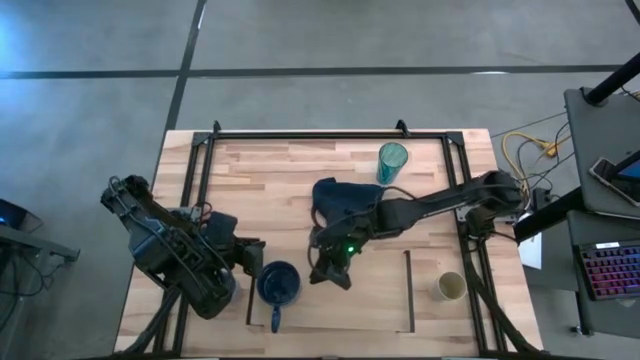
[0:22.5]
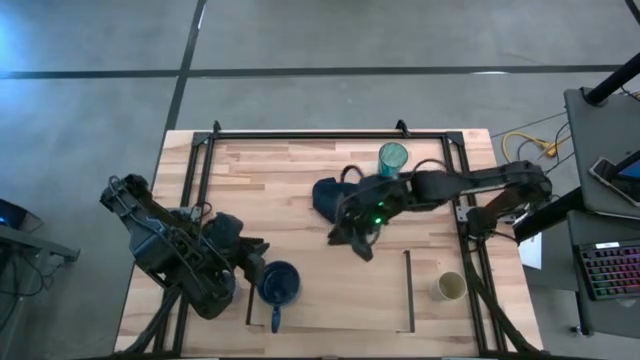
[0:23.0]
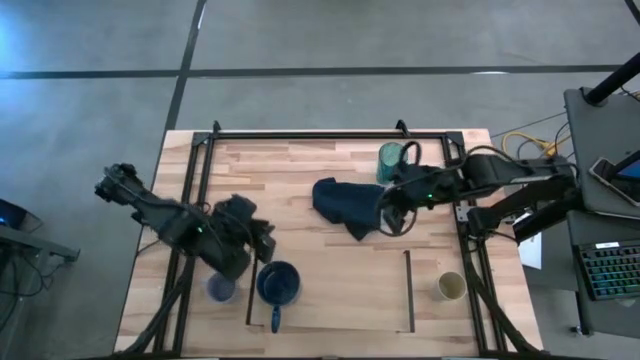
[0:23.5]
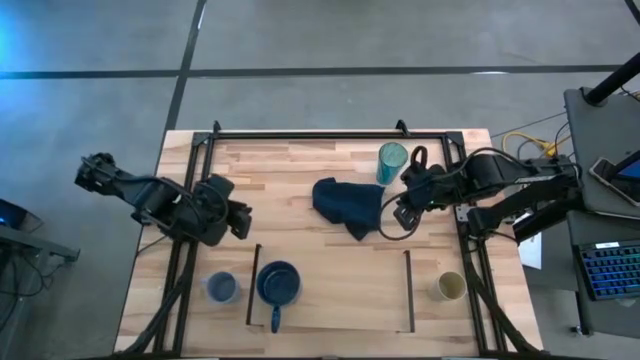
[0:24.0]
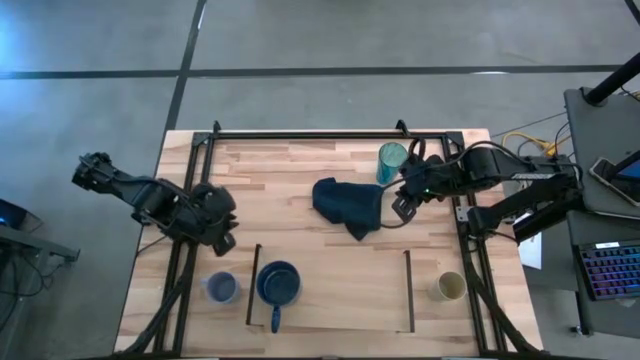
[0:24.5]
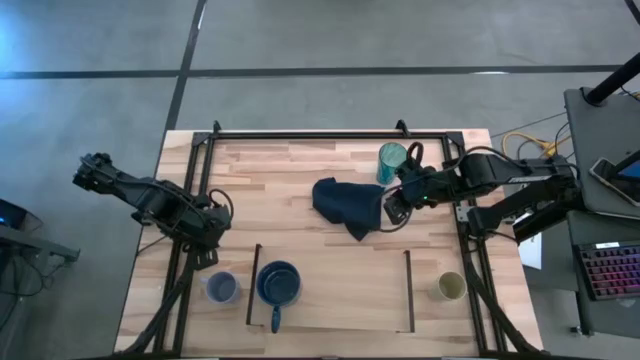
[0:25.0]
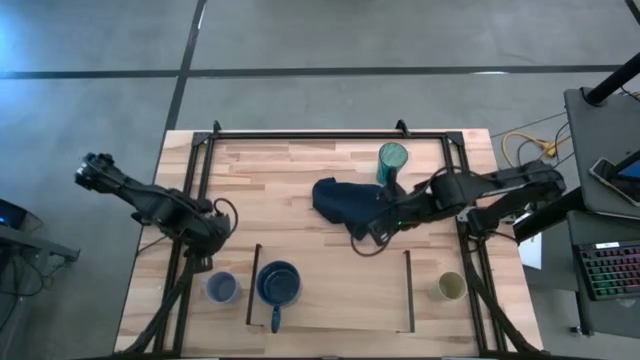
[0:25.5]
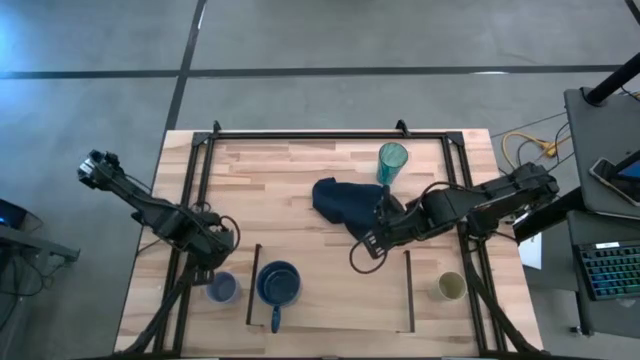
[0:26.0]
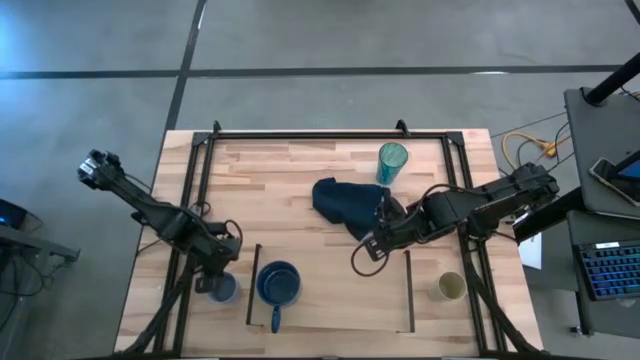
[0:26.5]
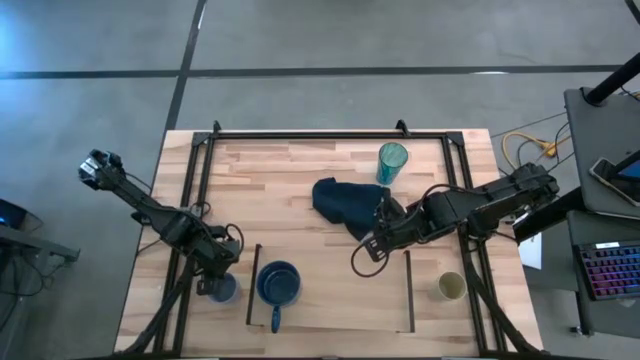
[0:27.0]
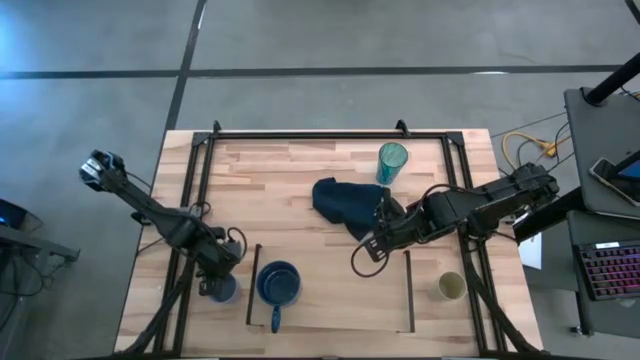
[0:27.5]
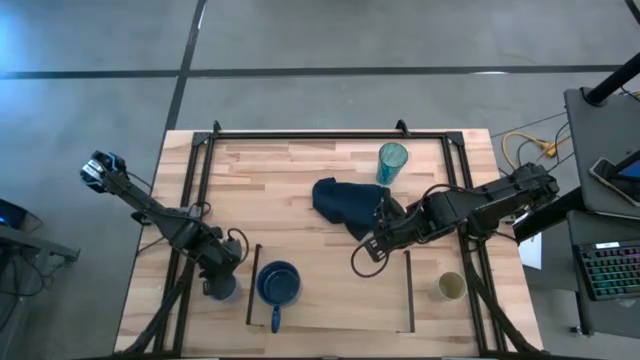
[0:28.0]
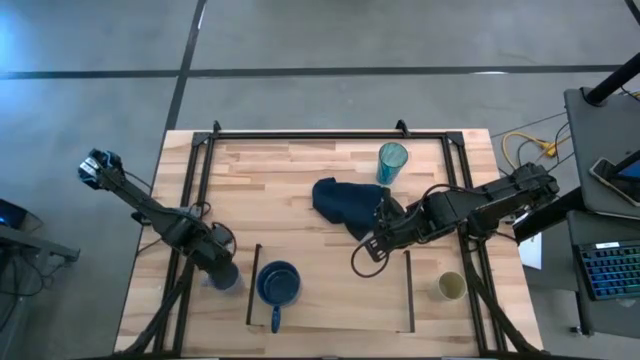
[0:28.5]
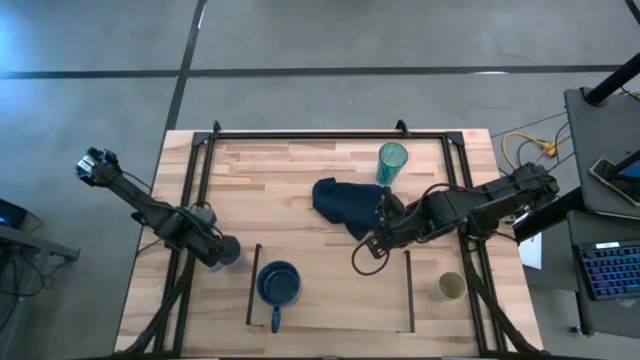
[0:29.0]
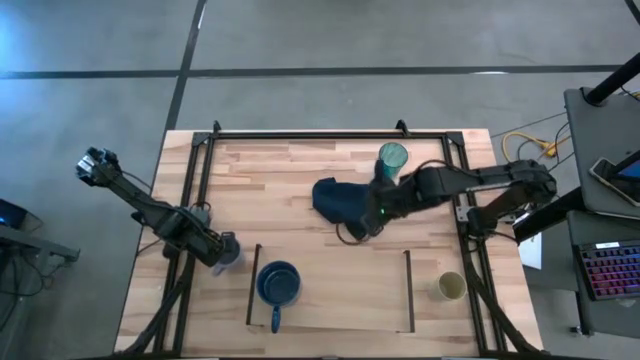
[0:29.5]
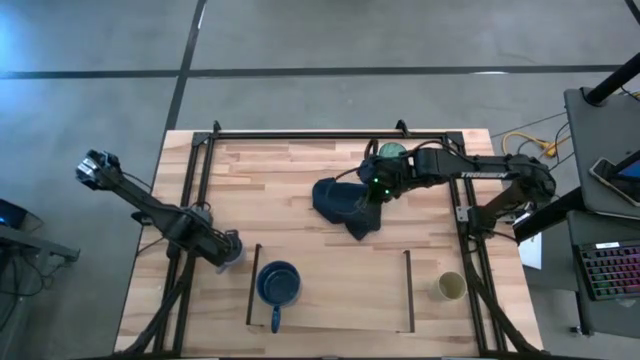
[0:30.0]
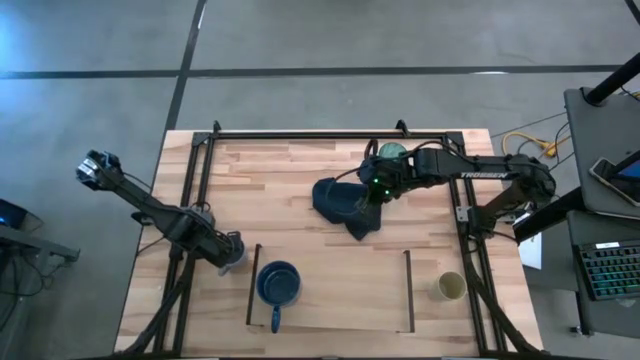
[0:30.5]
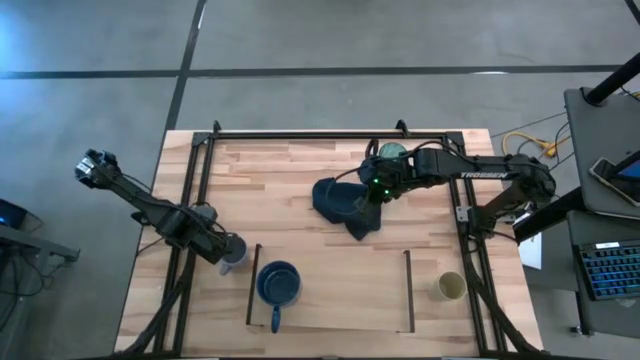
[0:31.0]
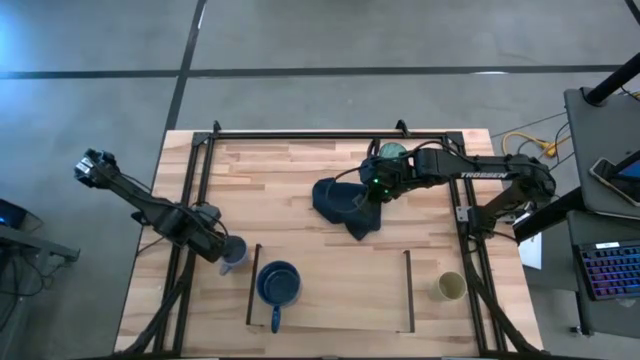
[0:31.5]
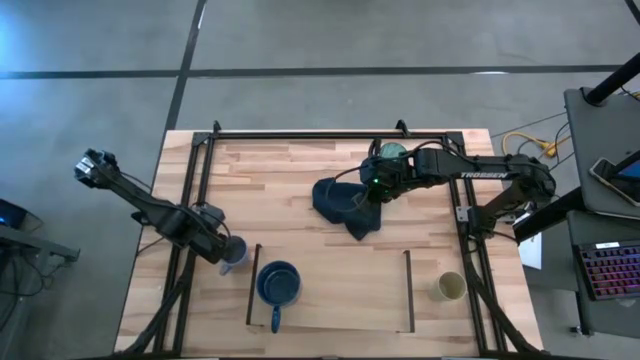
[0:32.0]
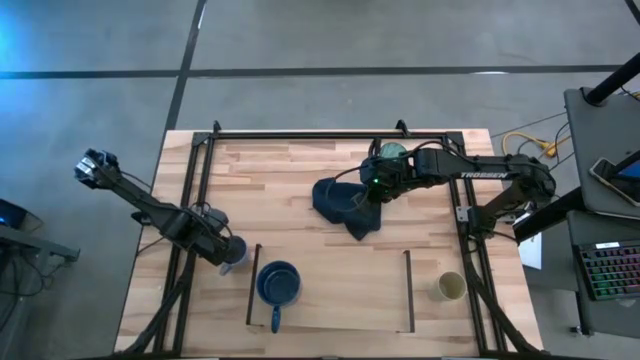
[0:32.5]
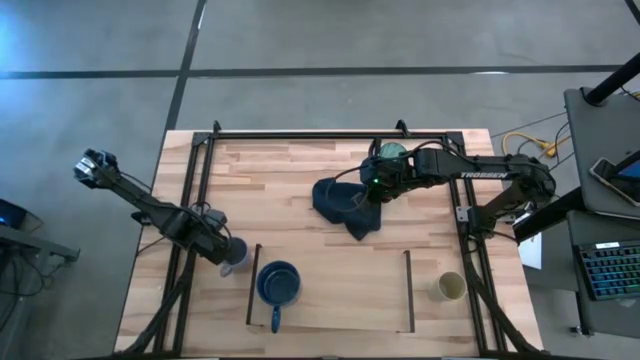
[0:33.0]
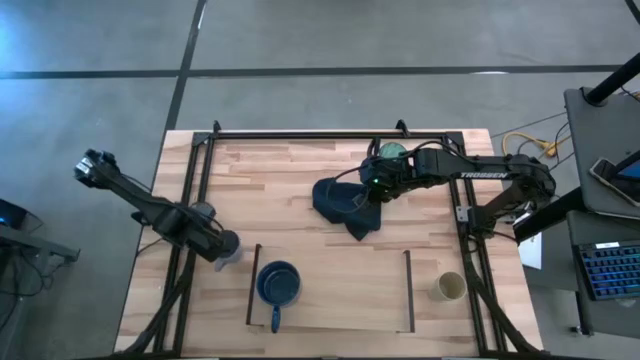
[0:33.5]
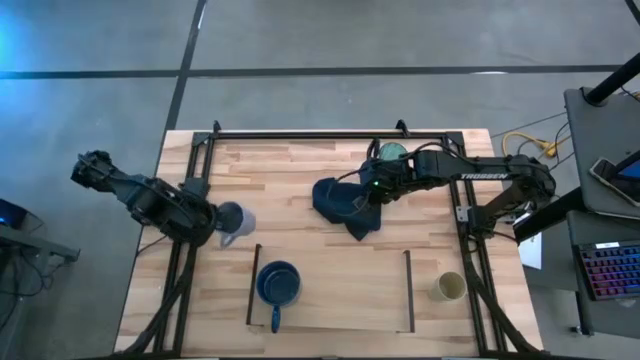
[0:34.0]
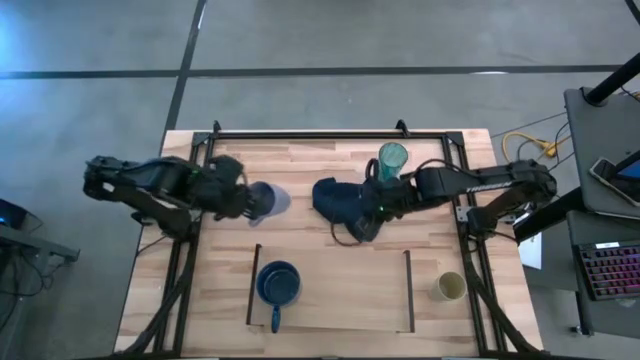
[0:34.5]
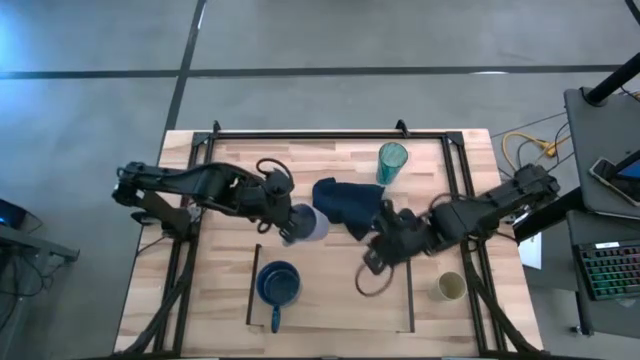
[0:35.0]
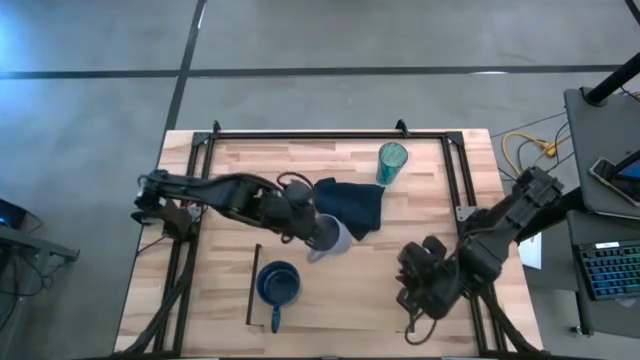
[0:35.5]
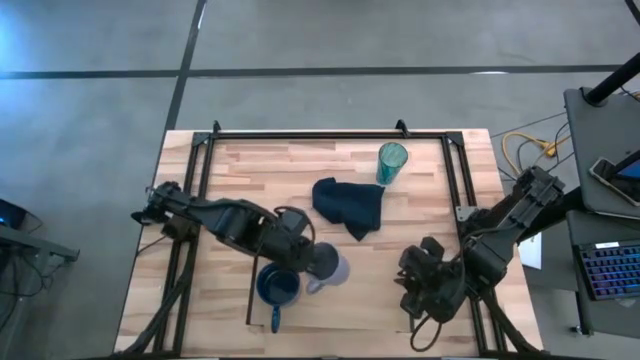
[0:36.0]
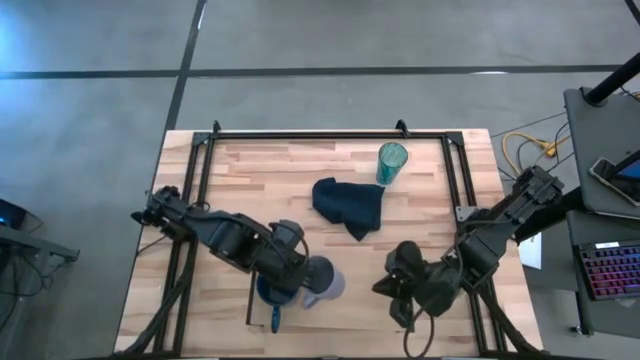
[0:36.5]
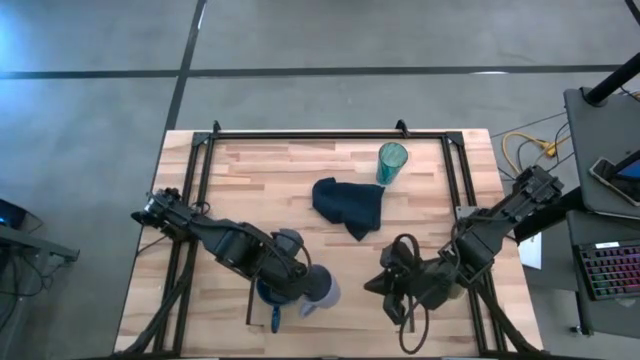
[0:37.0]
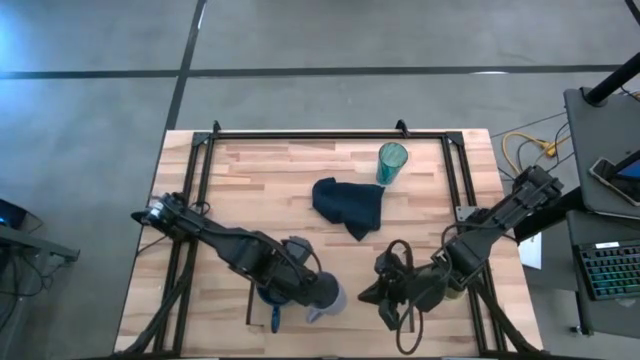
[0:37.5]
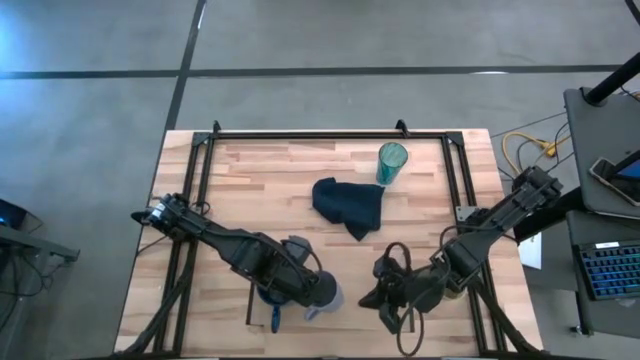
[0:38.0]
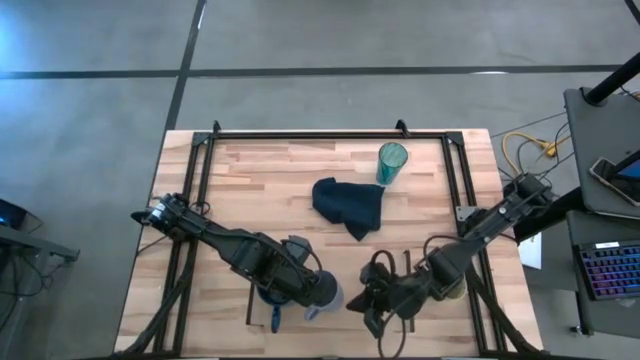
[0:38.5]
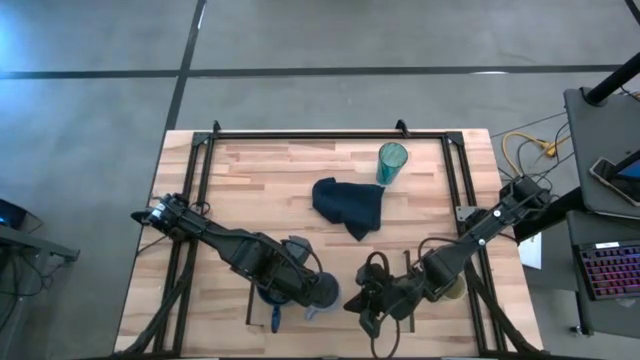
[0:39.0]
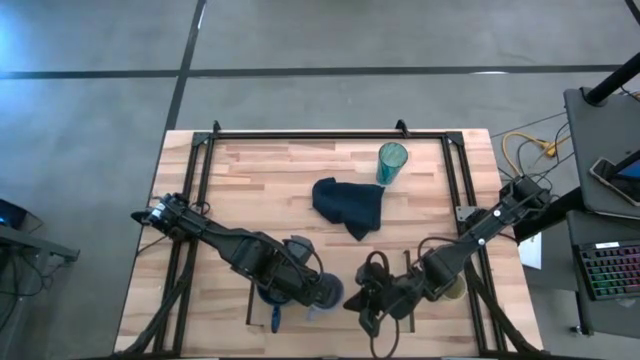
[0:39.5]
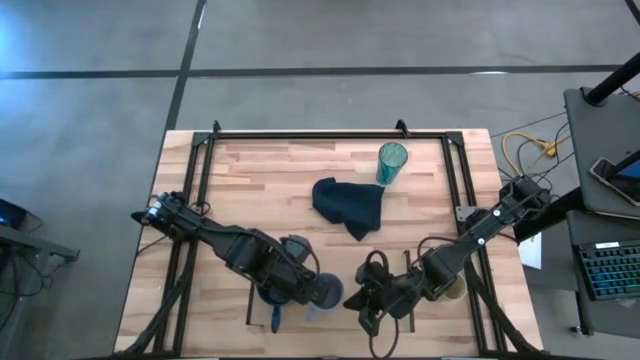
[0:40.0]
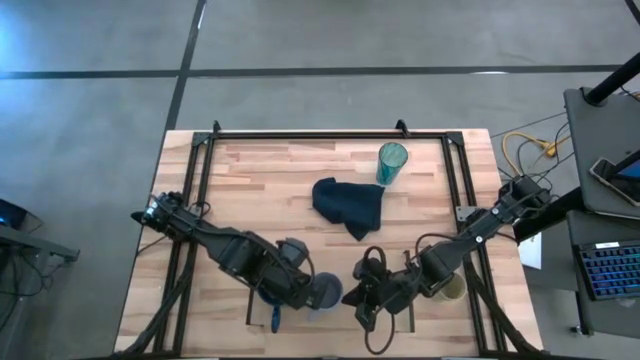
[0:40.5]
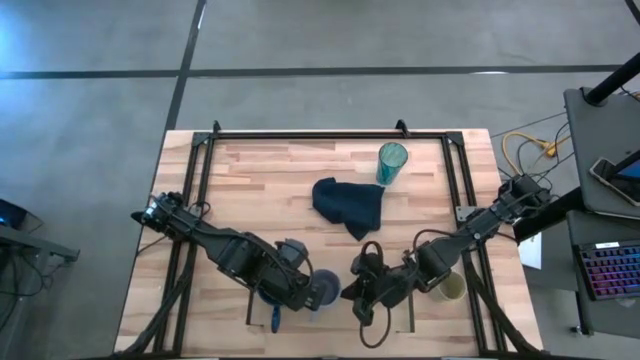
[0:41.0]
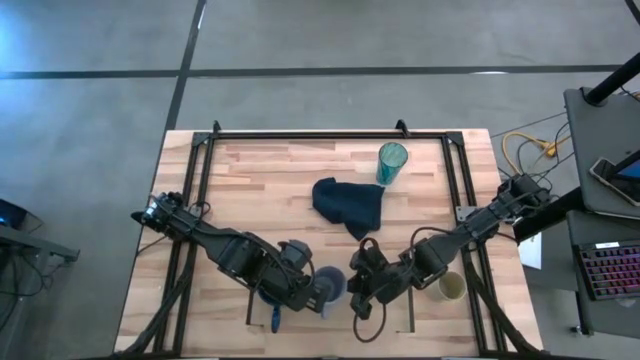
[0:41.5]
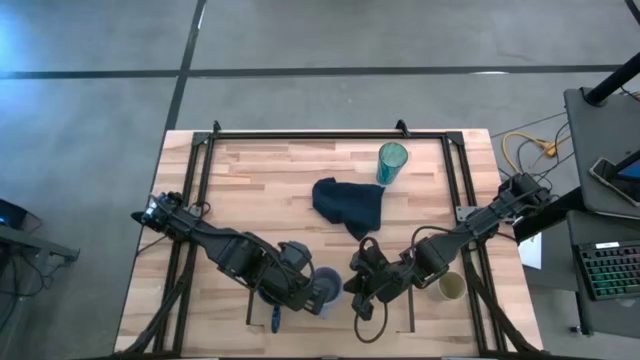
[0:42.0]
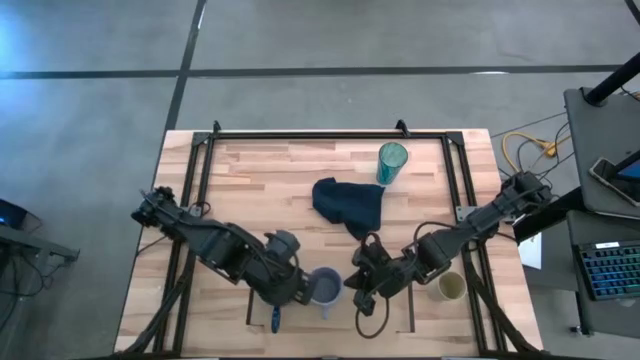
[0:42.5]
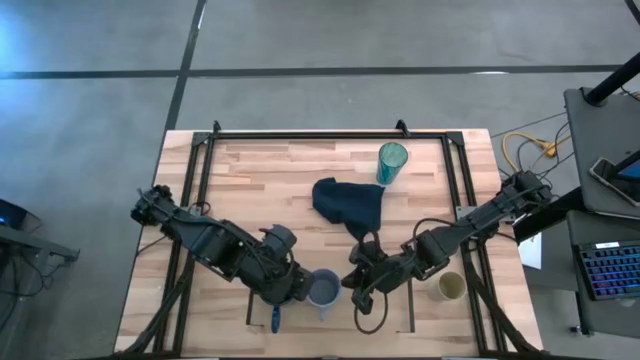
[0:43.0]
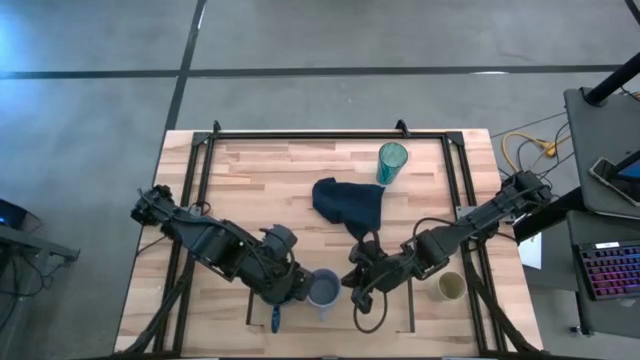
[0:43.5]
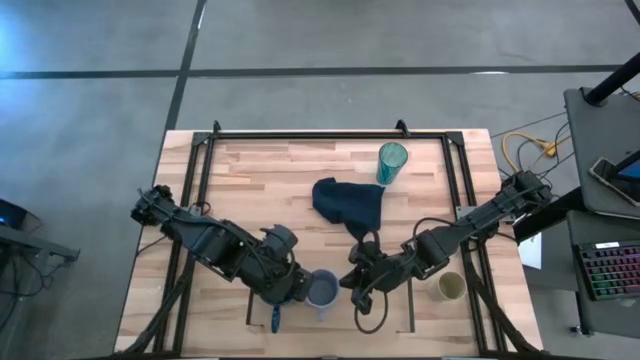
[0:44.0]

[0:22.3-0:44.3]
Task: Stack small to large cups/mugs on shelf
Put the light blue mug on the shelf
